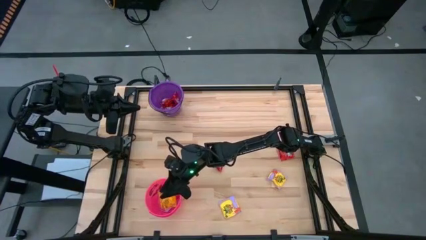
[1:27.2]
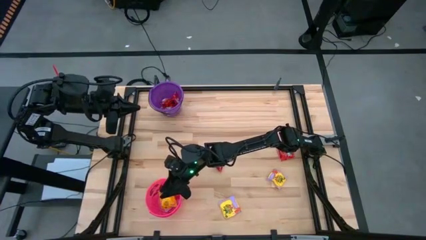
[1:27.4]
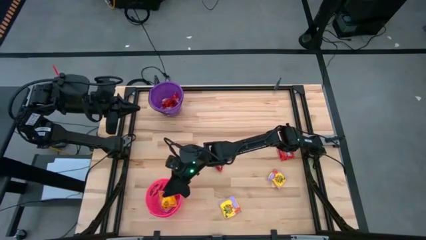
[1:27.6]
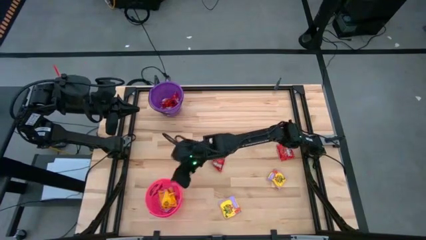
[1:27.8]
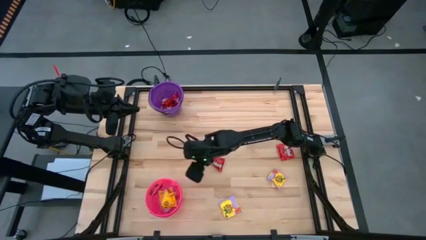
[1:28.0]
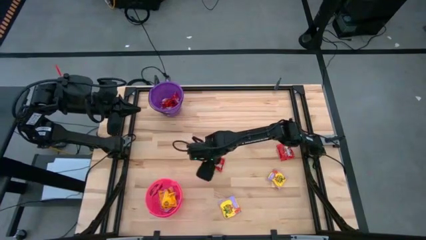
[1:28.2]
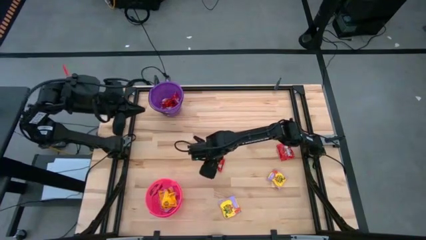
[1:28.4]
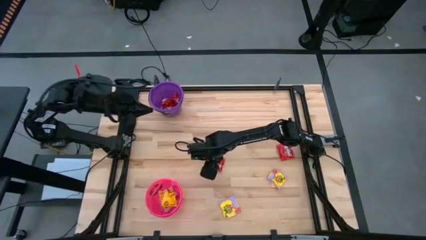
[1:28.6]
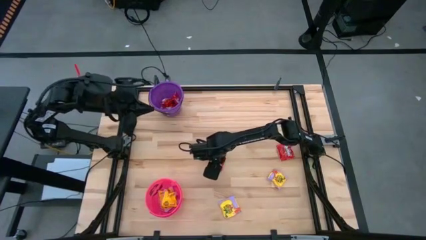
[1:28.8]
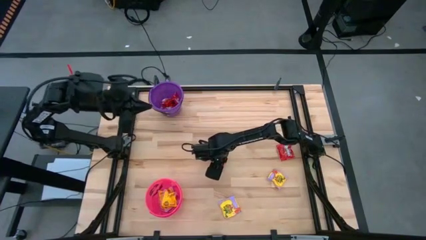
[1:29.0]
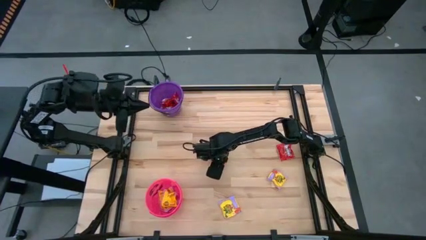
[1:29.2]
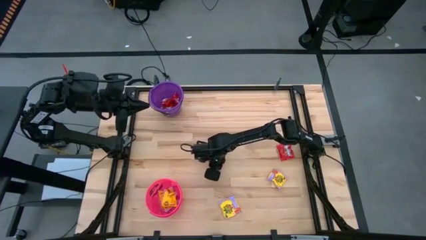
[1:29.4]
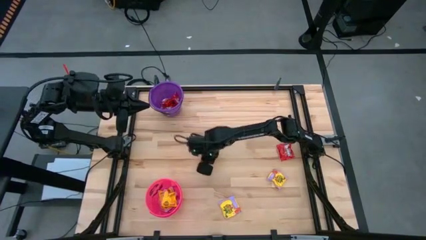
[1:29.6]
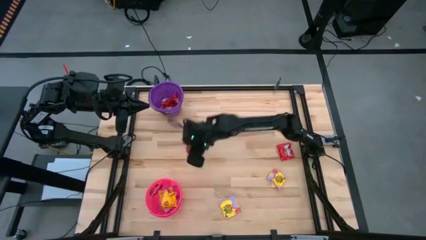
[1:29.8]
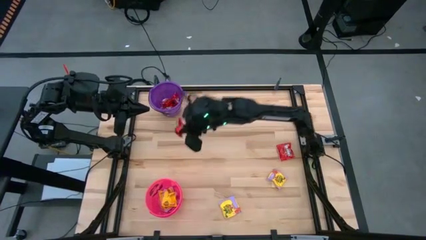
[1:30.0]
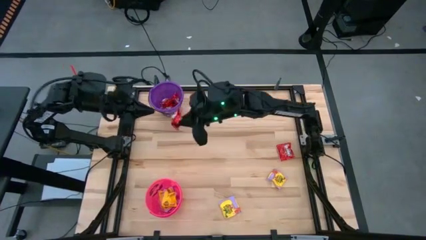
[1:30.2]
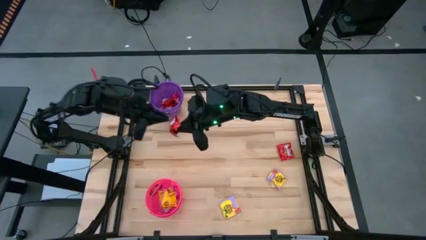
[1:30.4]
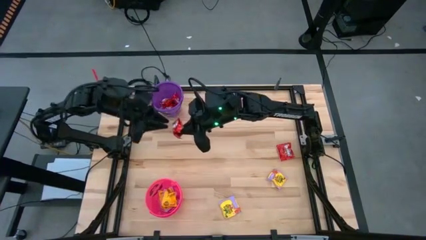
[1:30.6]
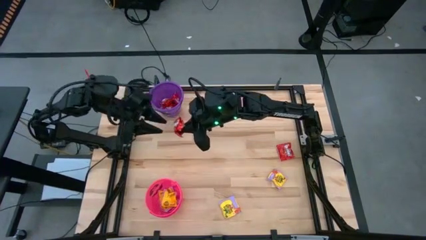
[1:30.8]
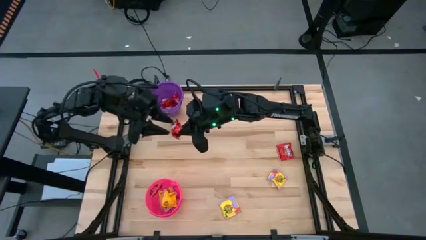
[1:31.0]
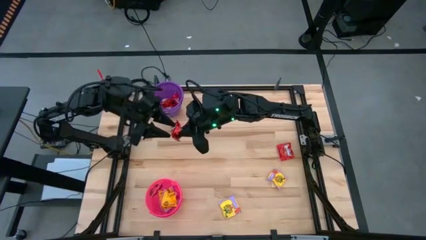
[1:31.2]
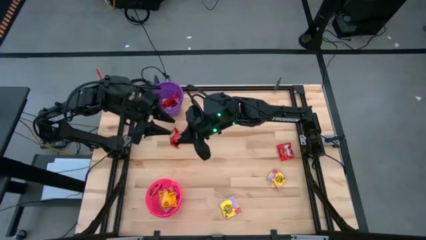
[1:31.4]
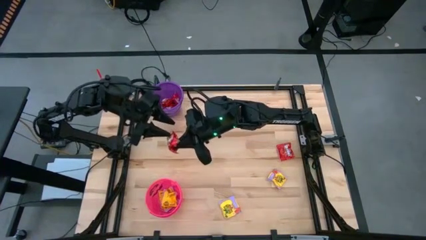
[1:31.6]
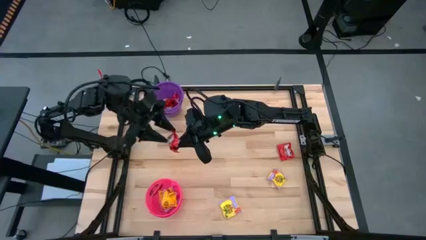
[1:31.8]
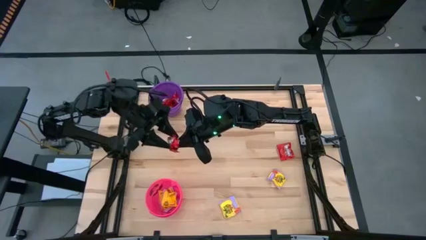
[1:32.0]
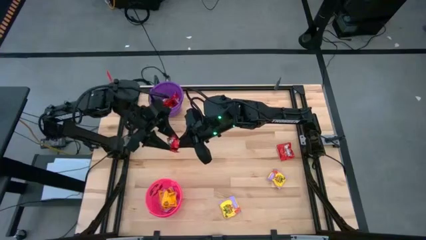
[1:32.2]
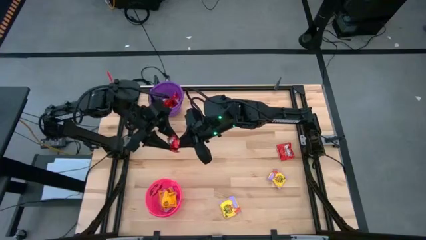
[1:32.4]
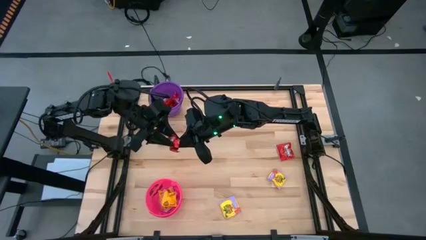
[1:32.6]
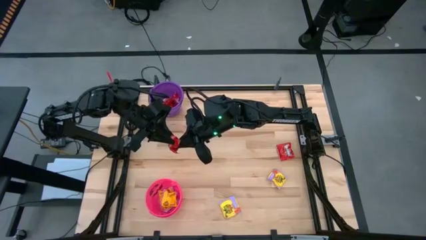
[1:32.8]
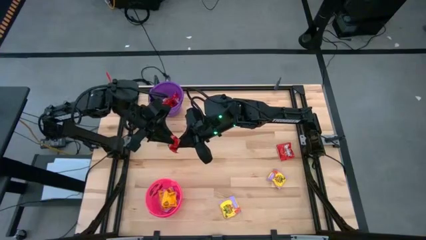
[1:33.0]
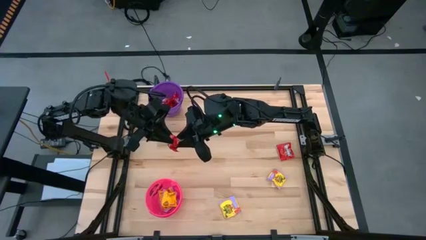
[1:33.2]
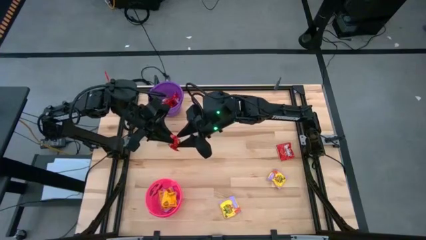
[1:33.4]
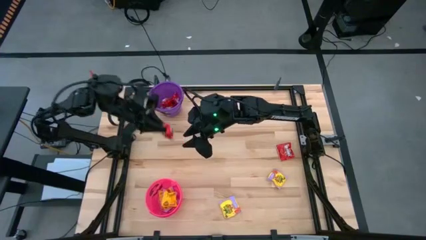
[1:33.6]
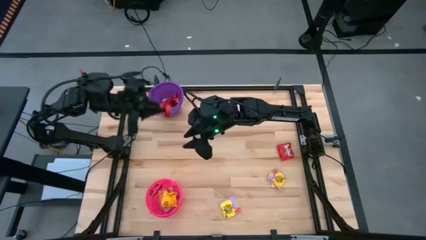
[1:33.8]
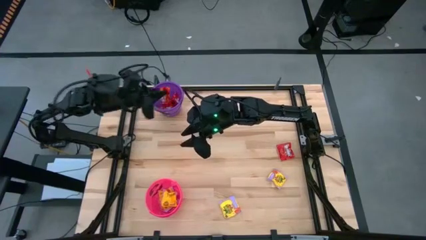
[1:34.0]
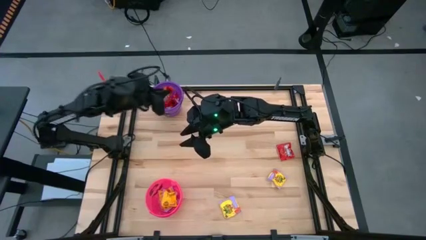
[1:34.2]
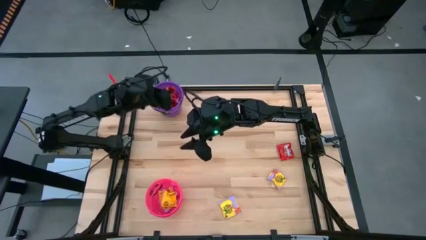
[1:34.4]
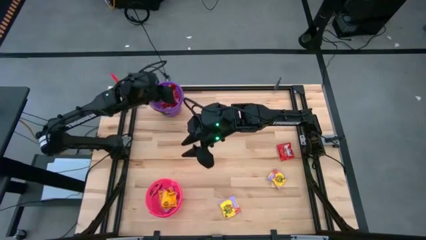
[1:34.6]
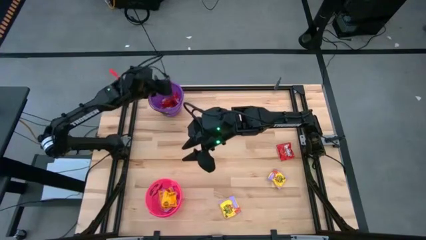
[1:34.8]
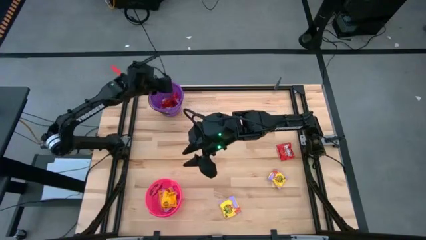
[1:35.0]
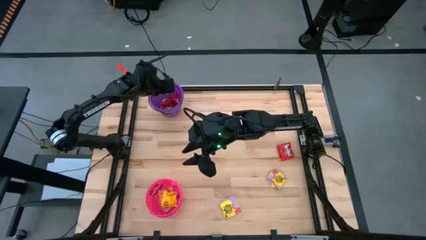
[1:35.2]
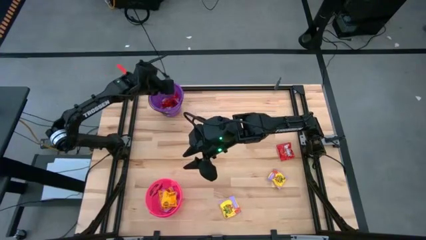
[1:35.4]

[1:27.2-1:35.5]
Task: Sort candy by brand, put in halloween buckets
Put the red candy into the purple bucket

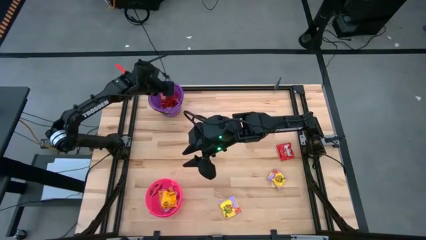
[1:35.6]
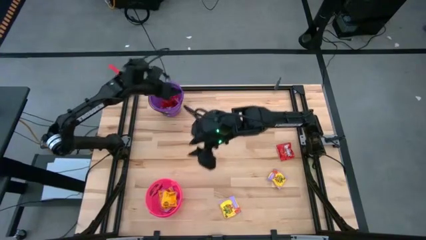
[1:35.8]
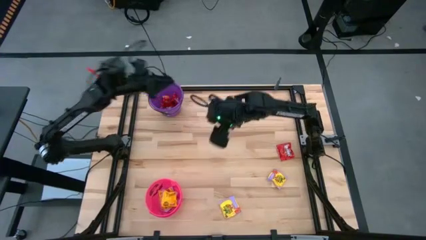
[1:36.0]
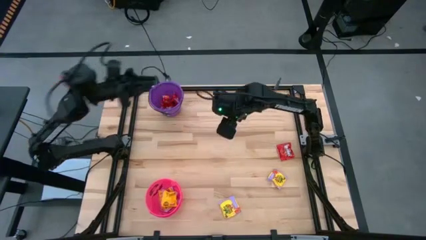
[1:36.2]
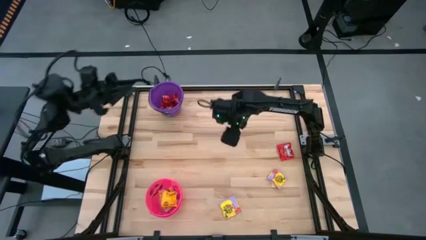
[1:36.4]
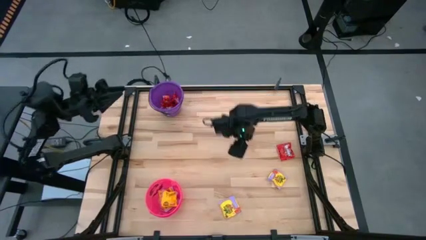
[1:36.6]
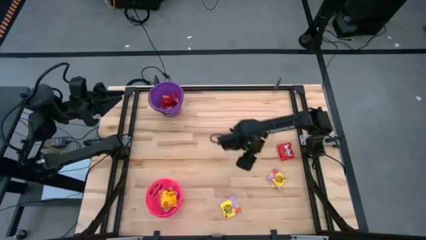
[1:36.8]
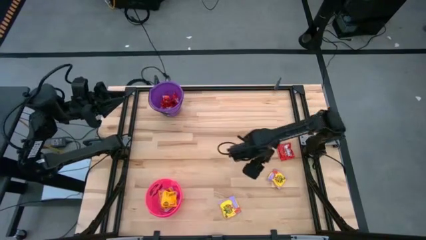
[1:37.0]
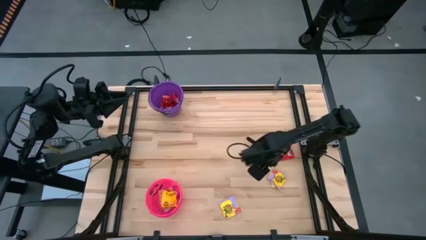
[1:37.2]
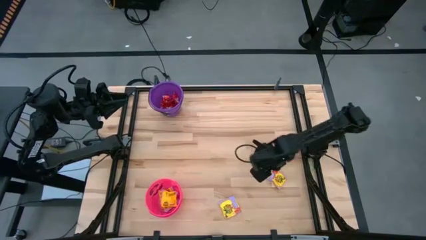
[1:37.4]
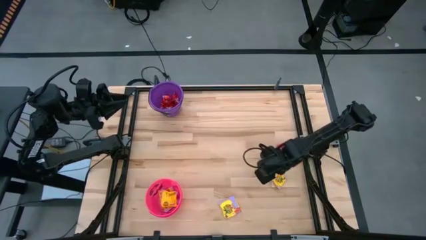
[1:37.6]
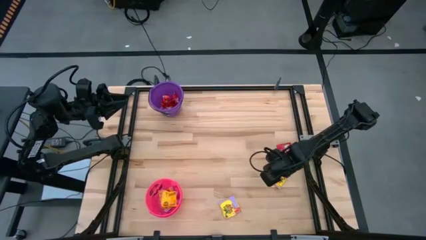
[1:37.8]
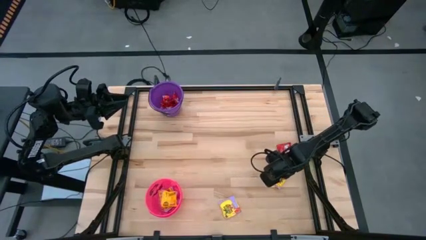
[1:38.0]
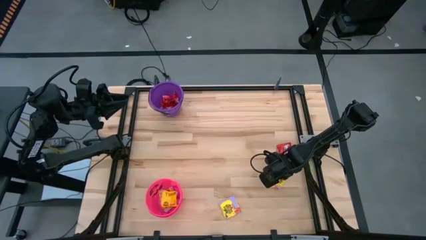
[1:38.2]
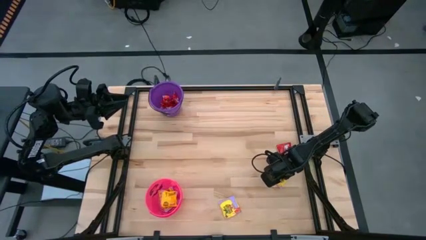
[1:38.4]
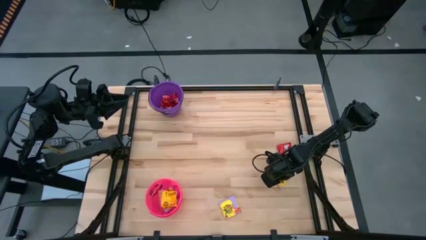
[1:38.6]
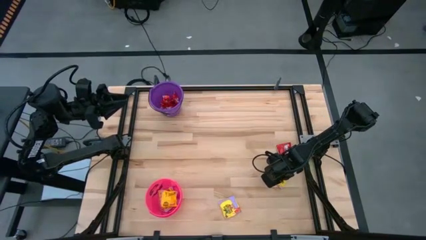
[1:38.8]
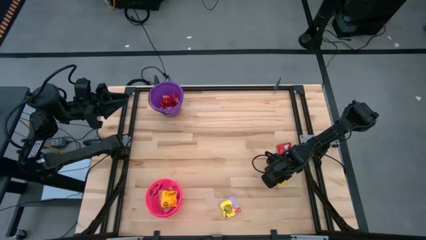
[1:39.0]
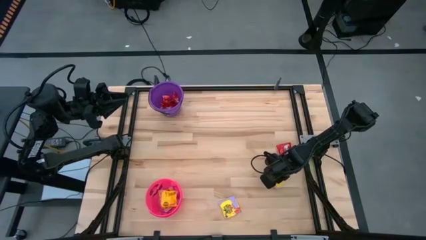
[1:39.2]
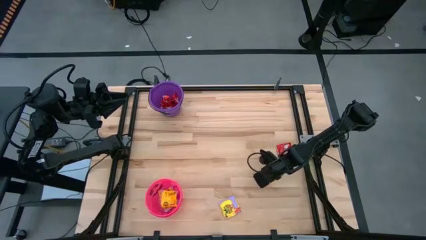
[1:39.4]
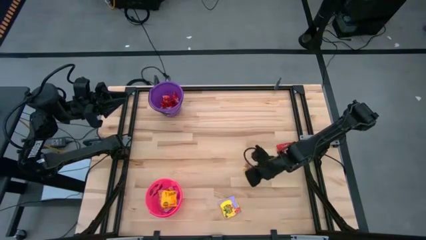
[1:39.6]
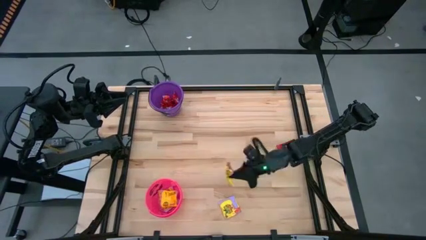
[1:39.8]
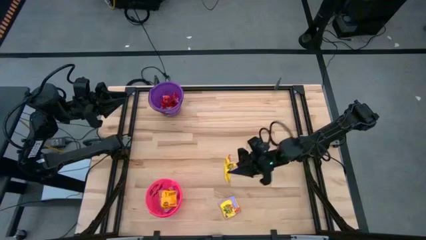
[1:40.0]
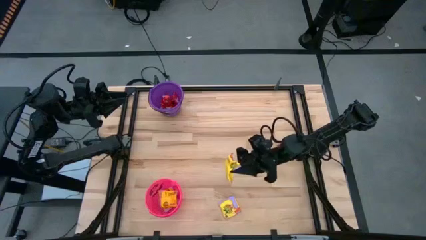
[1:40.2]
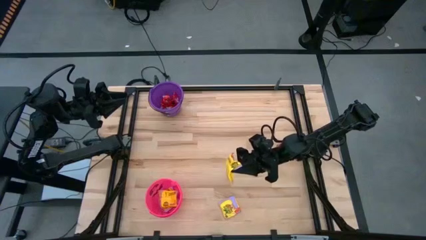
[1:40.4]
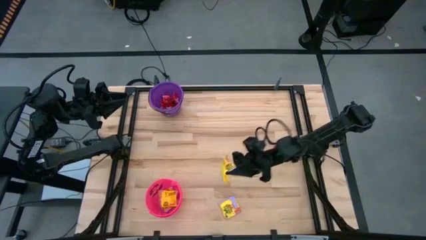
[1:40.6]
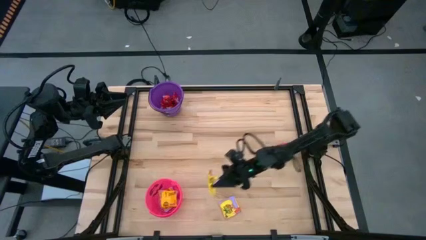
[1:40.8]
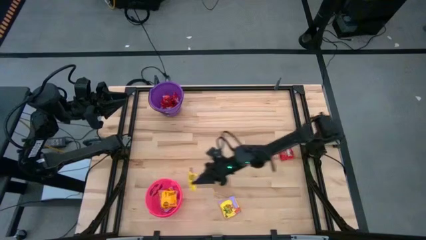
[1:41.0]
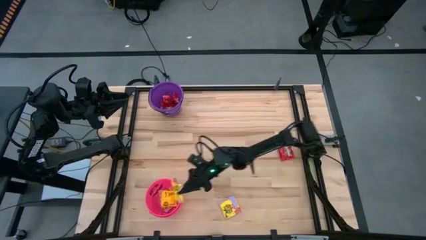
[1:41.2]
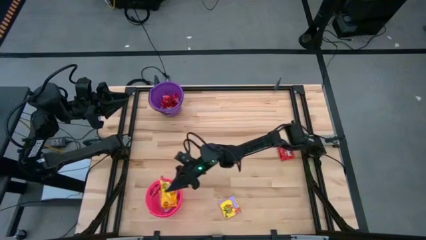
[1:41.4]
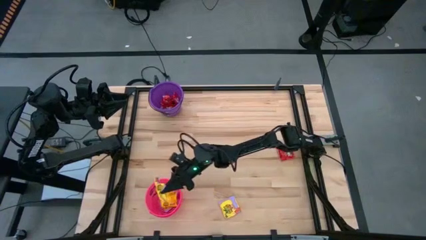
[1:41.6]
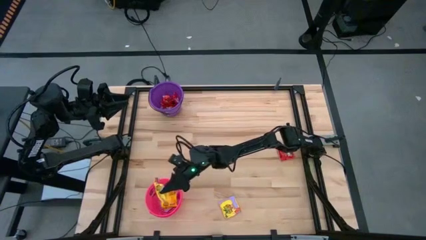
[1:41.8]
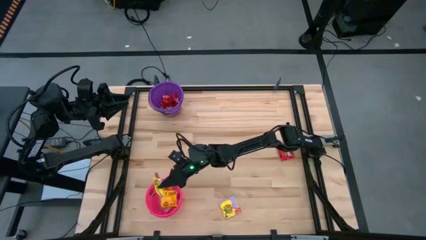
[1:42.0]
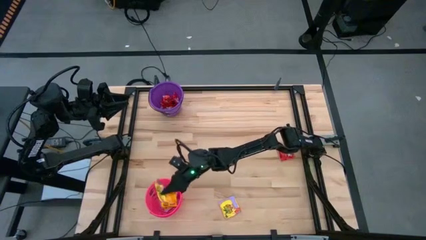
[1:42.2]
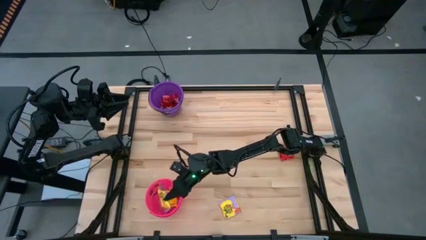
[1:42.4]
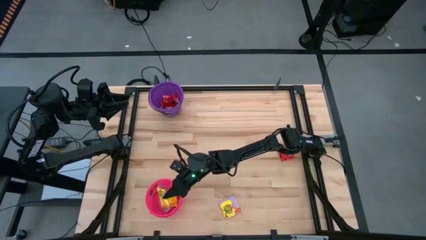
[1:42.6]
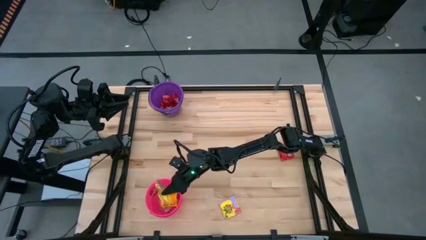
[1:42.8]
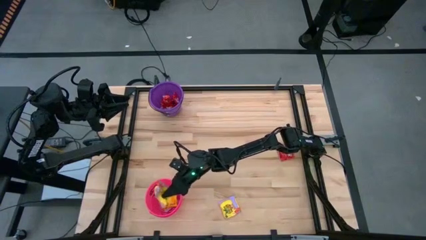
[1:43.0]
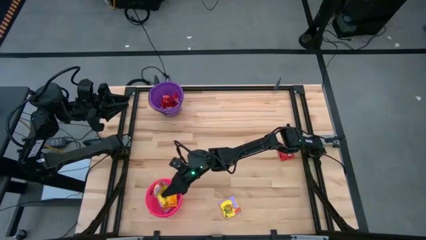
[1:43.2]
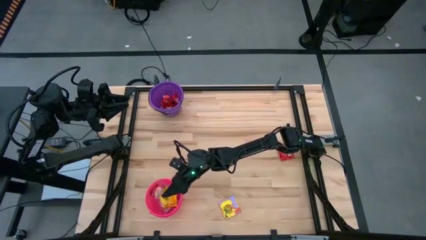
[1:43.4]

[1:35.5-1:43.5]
Put the yellow candy into the pink bucket
